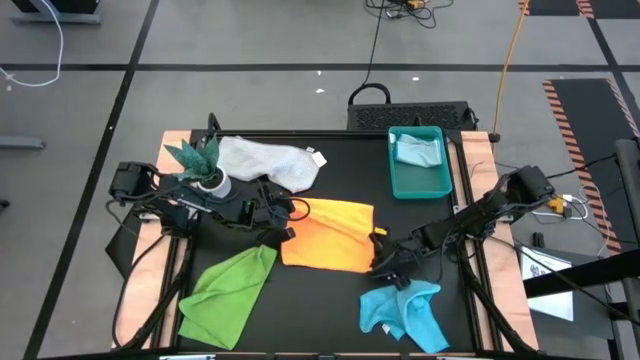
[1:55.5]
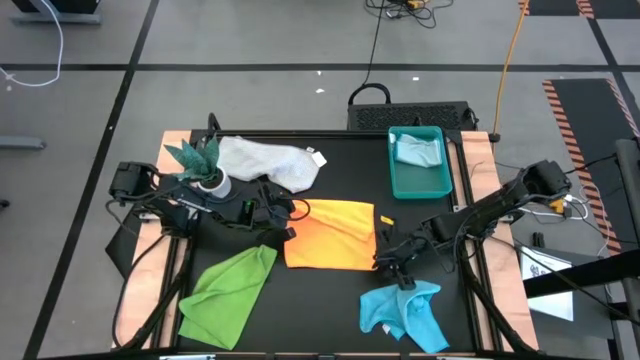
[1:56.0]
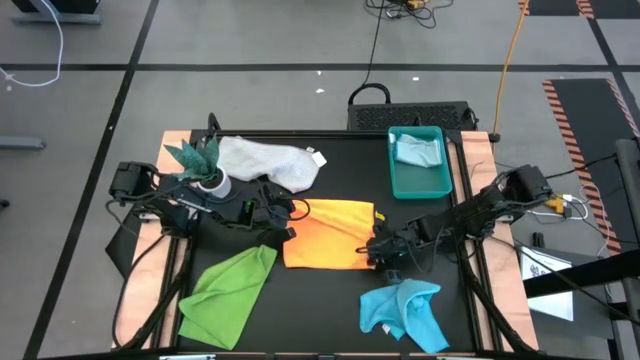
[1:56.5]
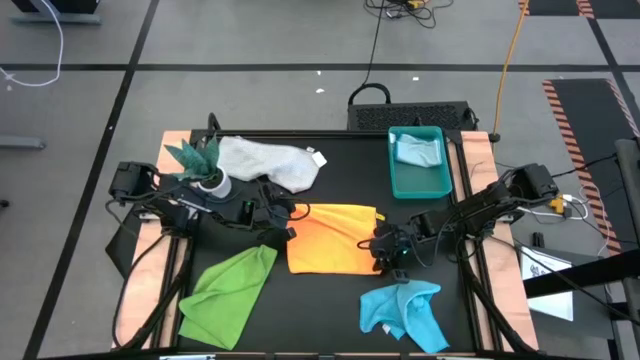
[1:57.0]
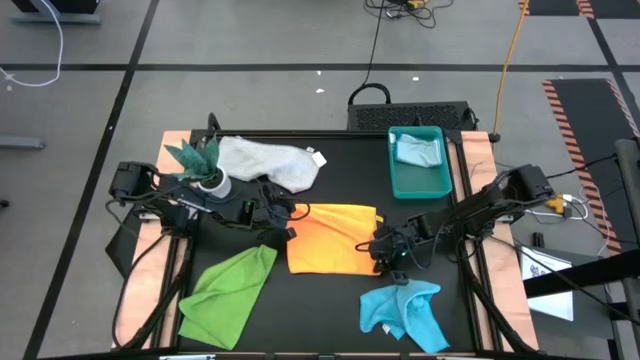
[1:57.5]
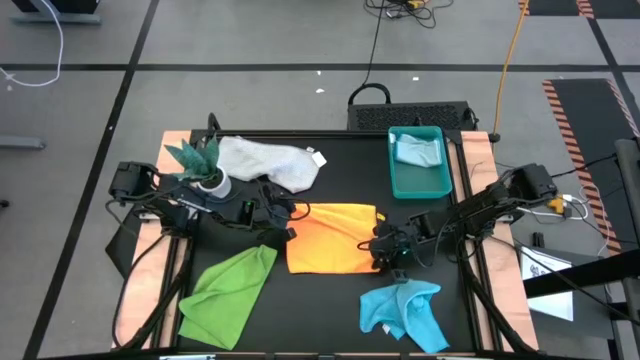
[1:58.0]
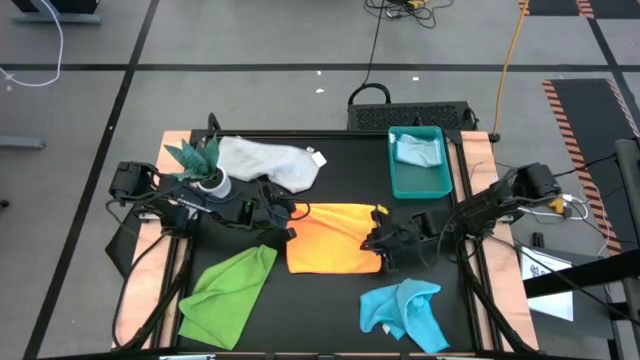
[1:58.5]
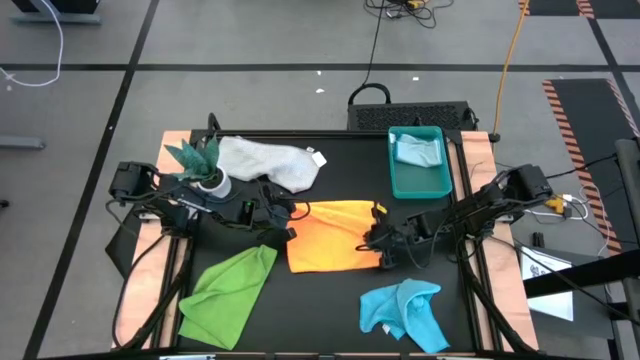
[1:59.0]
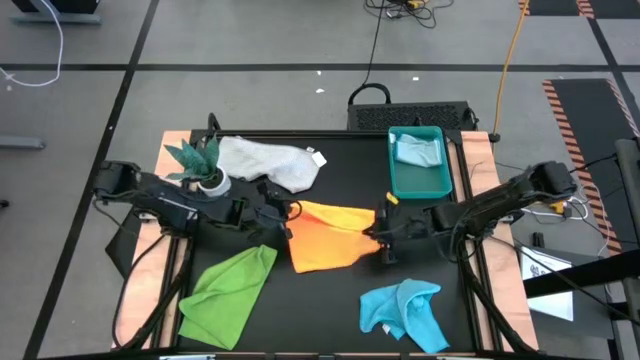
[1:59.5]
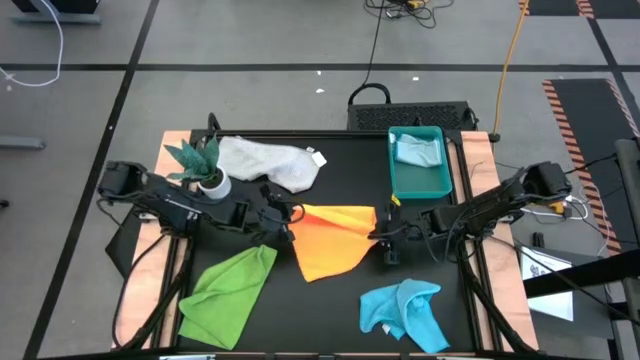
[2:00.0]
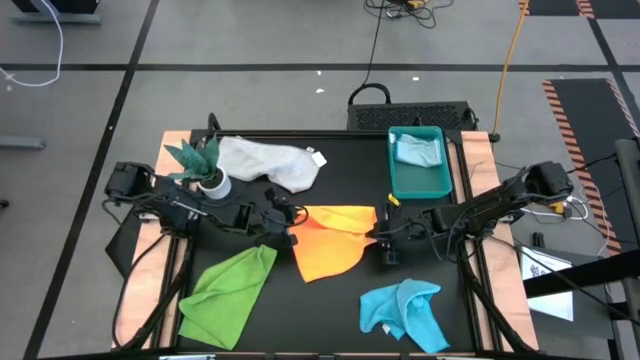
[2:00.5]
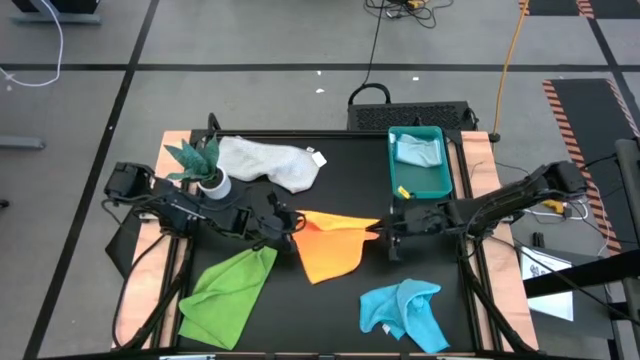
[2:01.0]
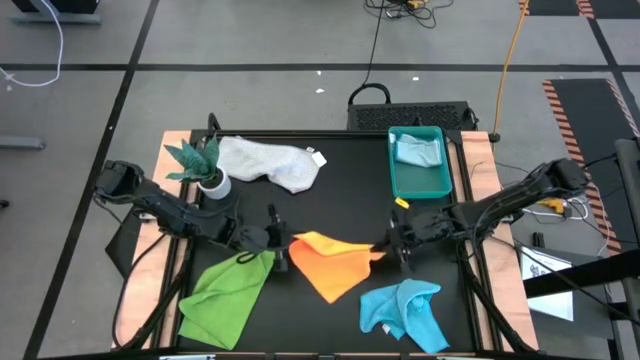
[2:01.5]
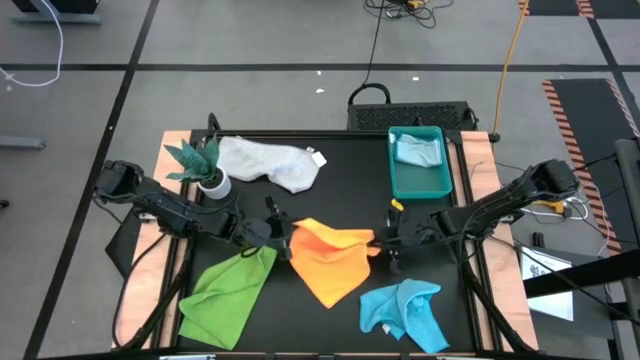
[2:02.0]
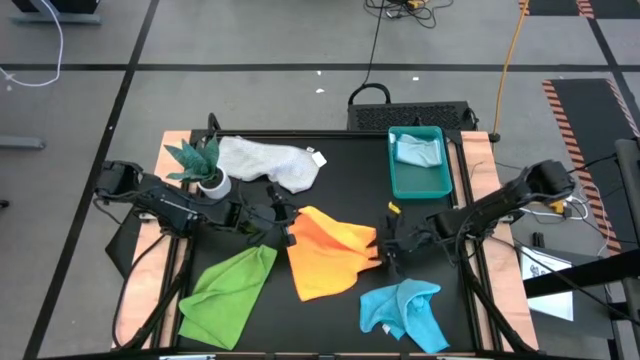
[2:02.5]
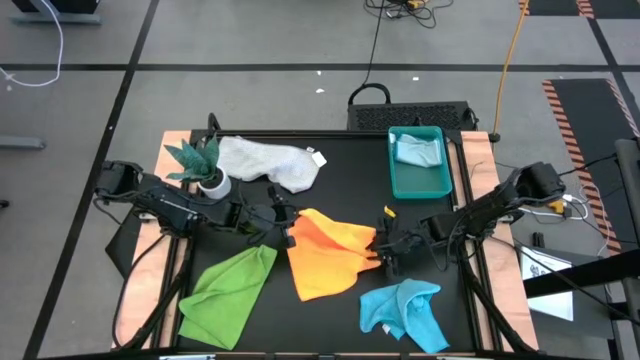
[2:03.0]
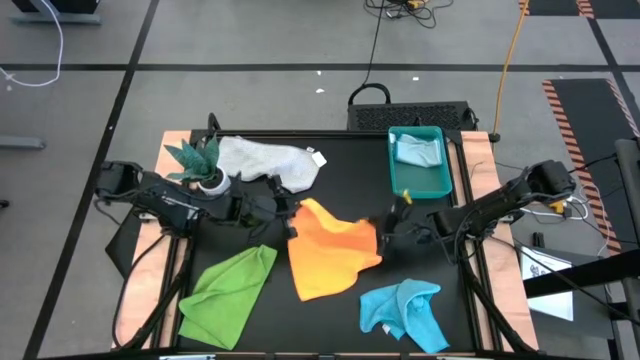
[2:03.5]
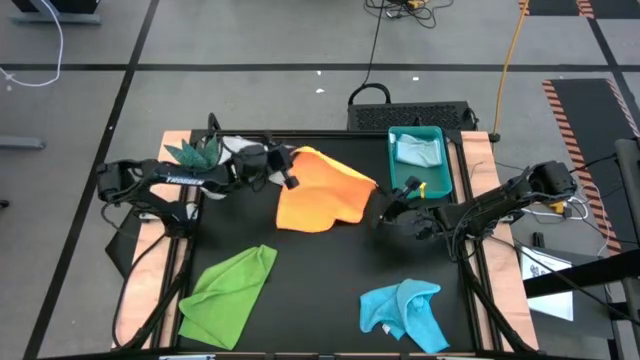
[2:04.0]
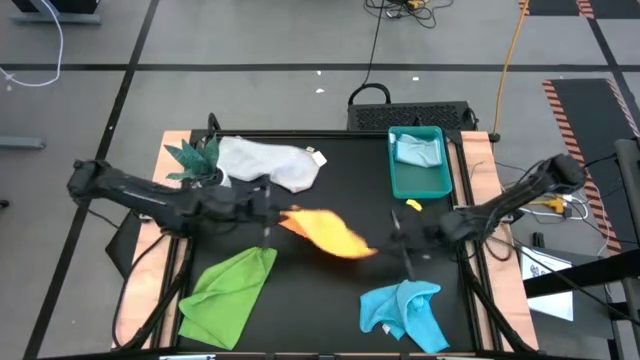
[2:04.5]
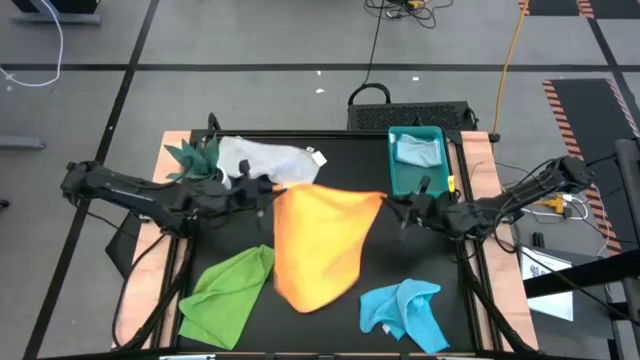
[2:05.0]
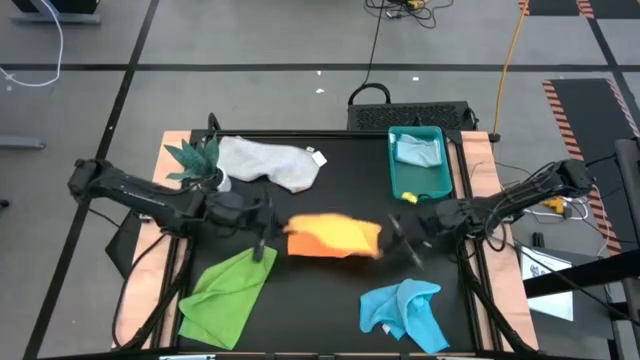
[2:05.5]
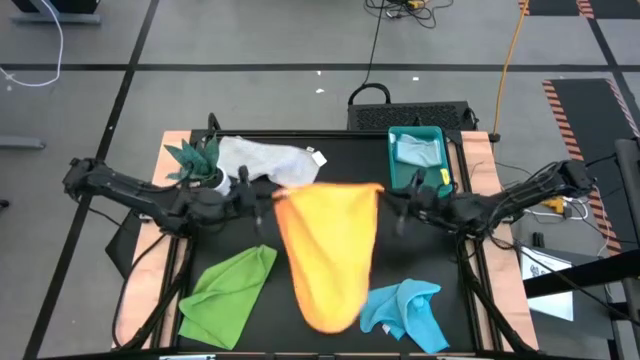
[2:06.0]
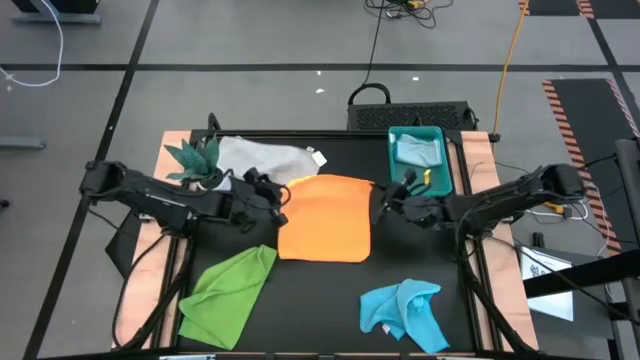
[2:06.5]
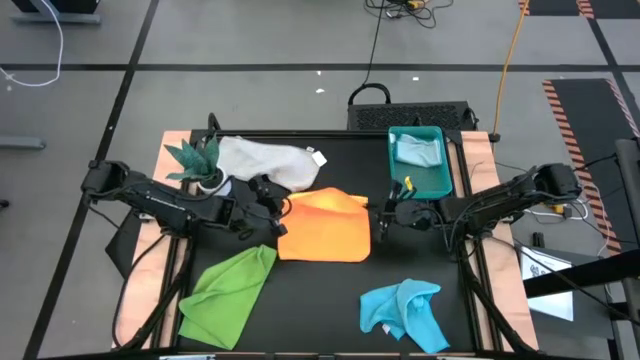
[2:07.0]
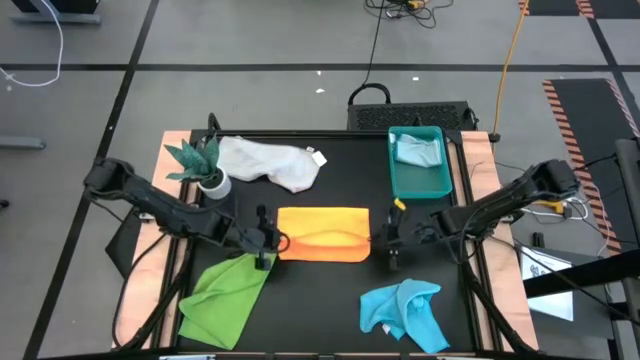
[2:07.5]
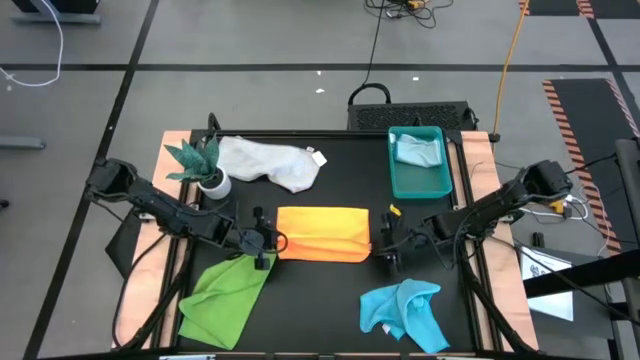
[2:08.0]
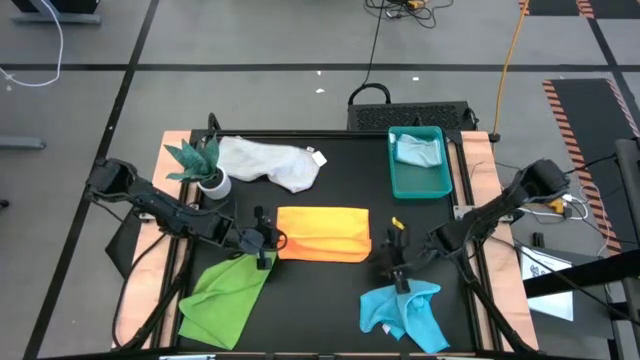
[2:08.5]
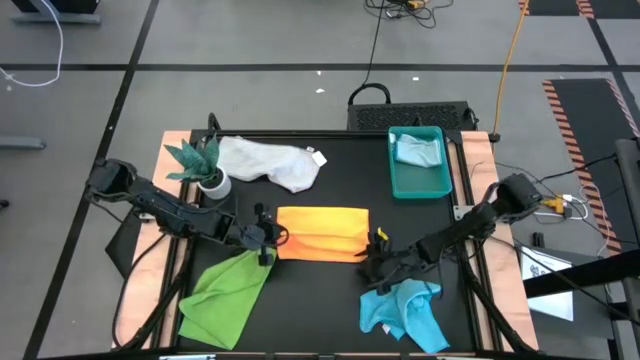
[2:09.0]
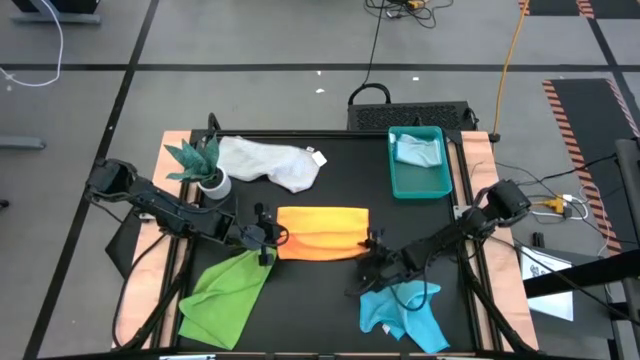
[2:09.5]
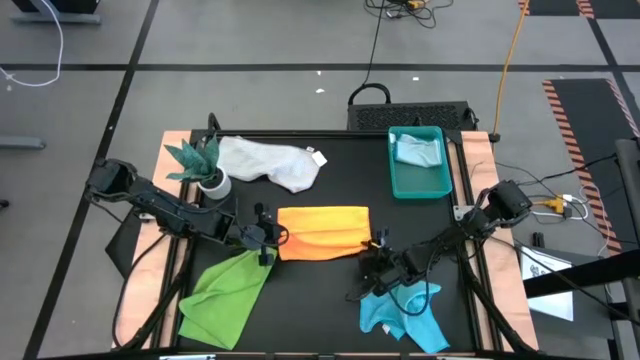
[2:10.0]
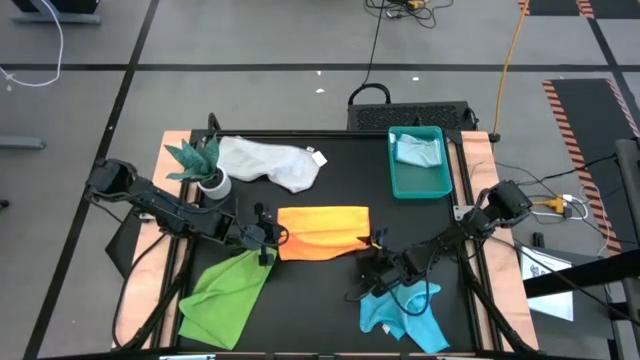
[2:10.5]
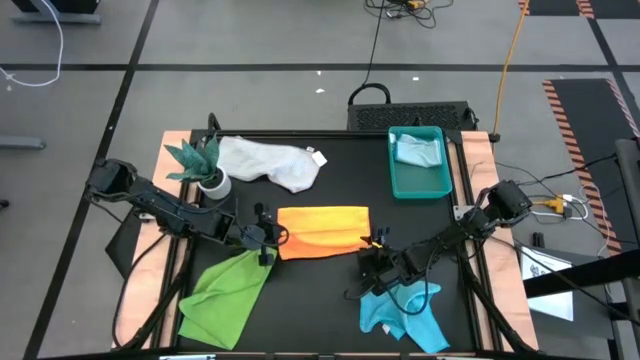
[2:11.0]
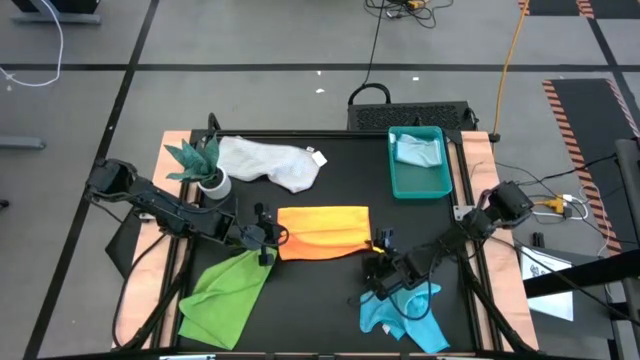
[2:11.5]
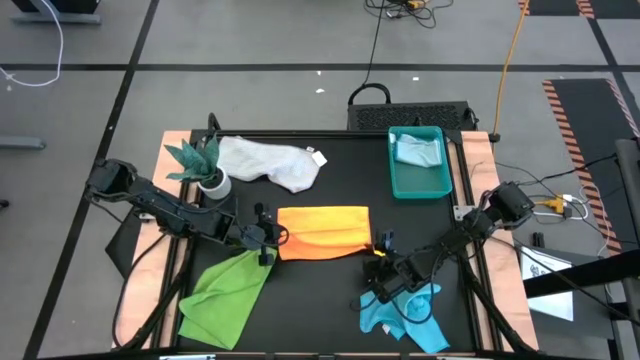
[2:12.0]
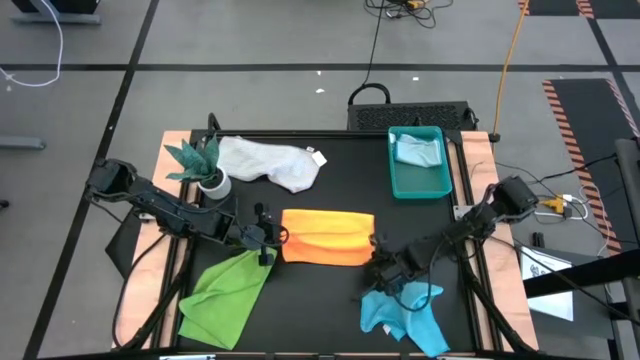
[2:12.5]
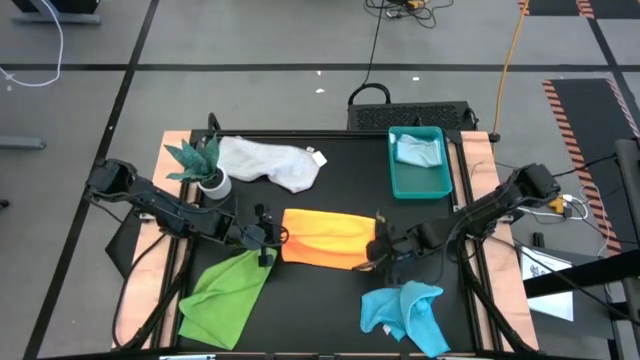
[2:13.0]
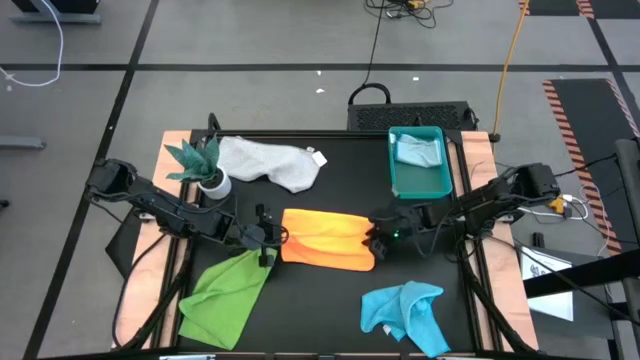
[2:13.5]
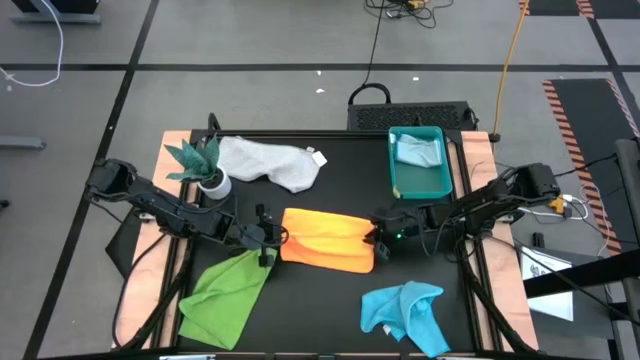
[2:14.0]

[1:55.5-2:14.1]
Task: Fold microfiber towels
Fold the orange microfiber cloth

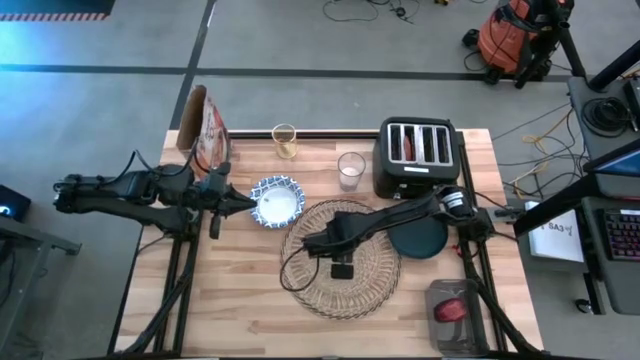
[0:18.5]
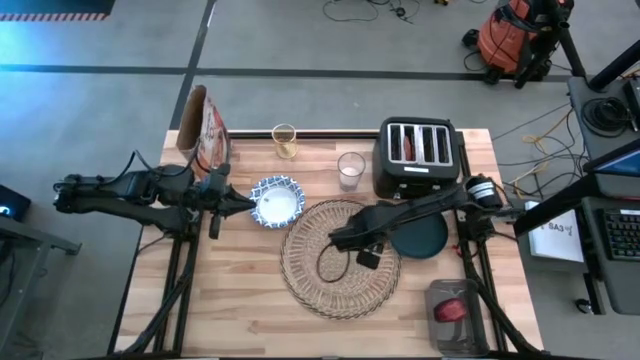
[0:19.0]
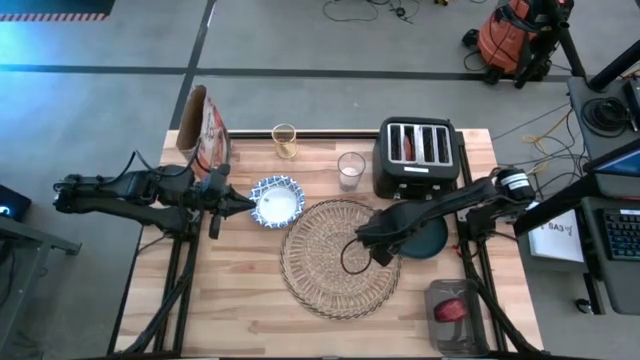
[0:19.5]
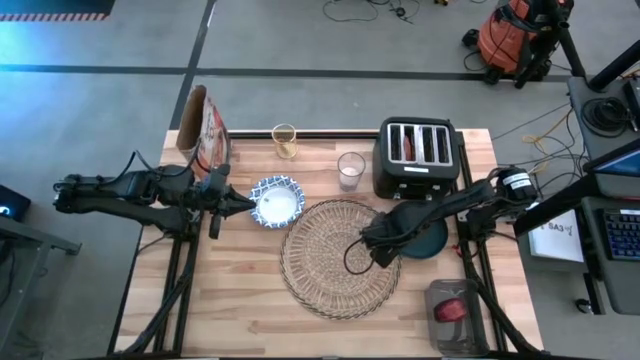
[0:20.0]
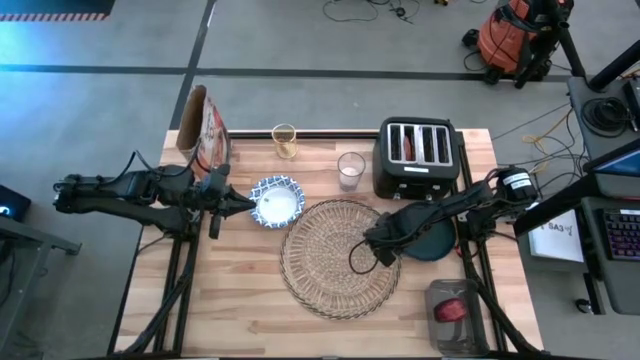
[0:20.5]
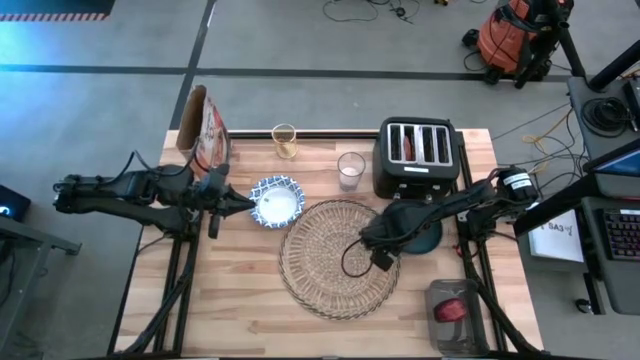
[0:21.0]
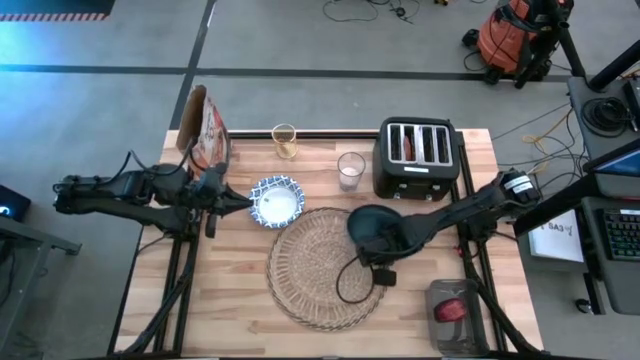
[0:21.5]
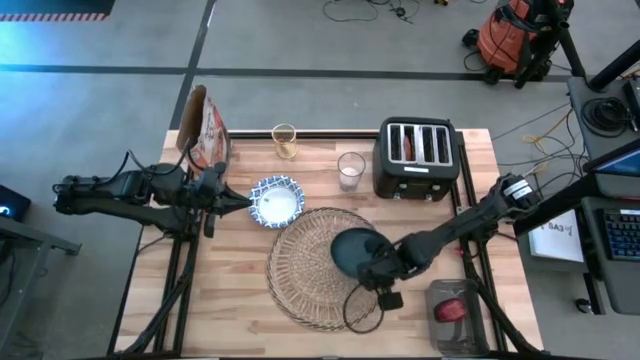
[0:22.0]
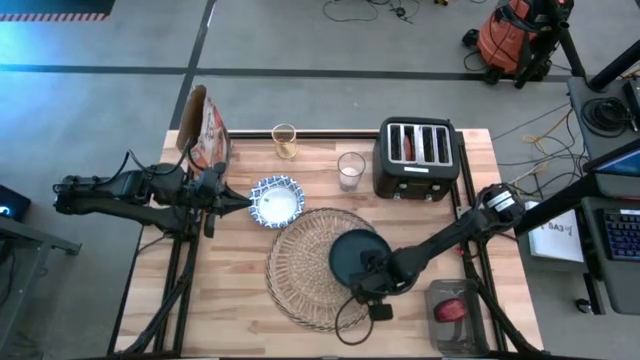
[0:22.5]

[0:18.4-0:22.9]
Task: Arrange a breakfast setting
Put the black plate on the brown table mat
